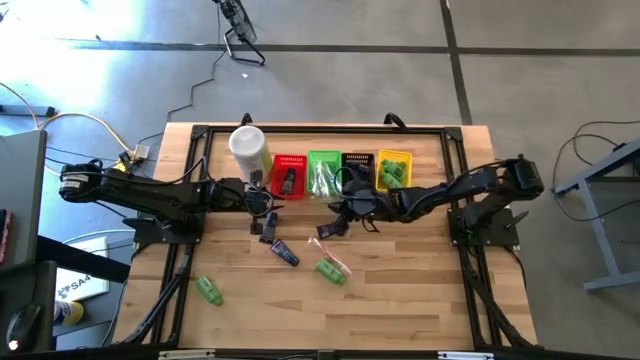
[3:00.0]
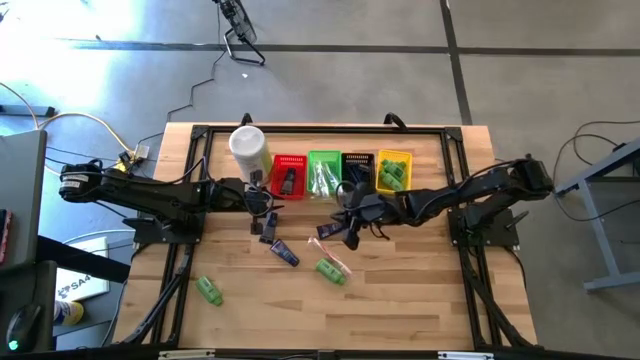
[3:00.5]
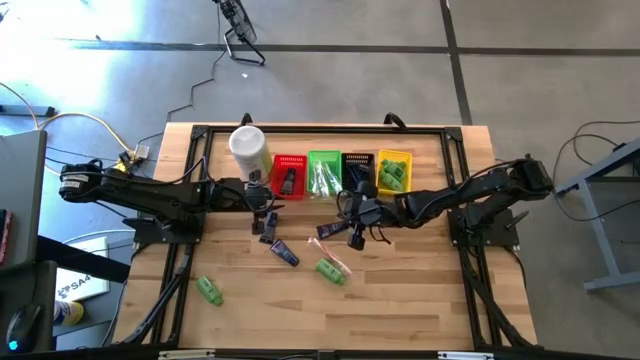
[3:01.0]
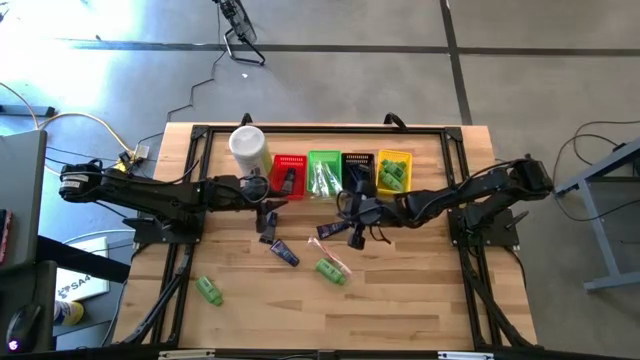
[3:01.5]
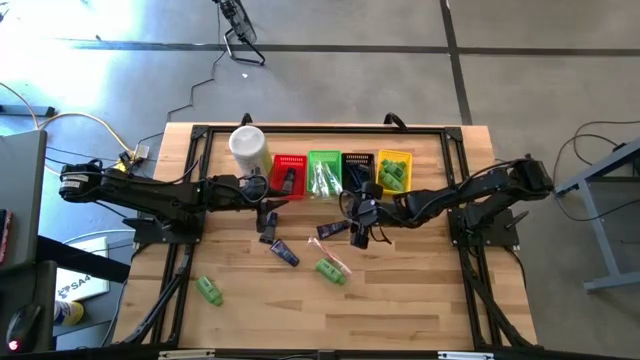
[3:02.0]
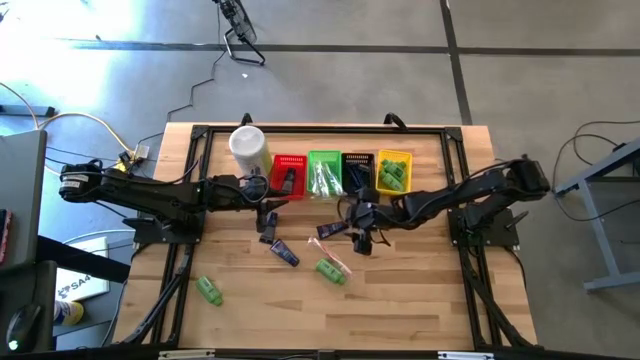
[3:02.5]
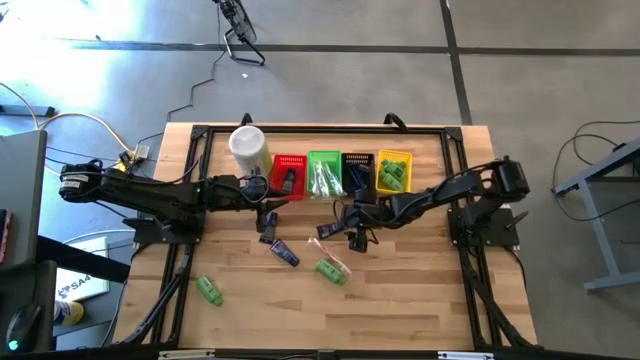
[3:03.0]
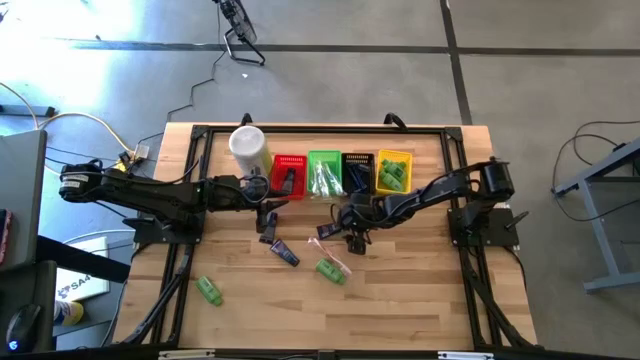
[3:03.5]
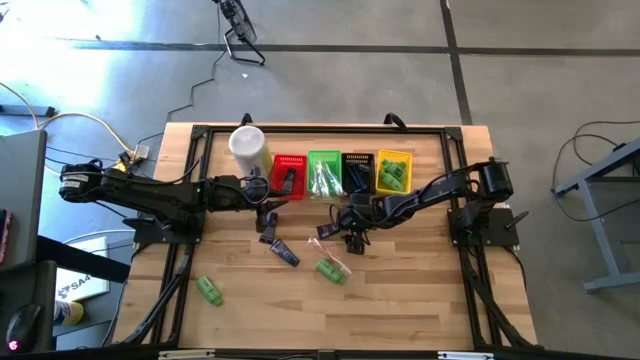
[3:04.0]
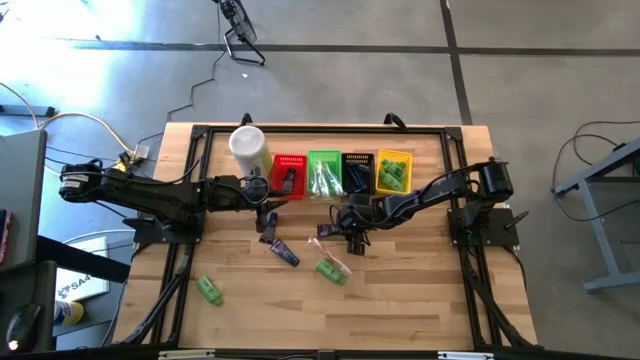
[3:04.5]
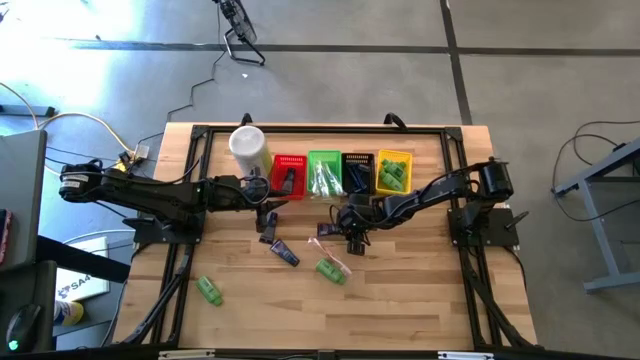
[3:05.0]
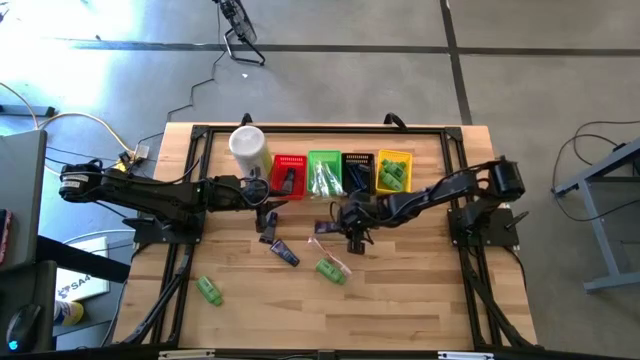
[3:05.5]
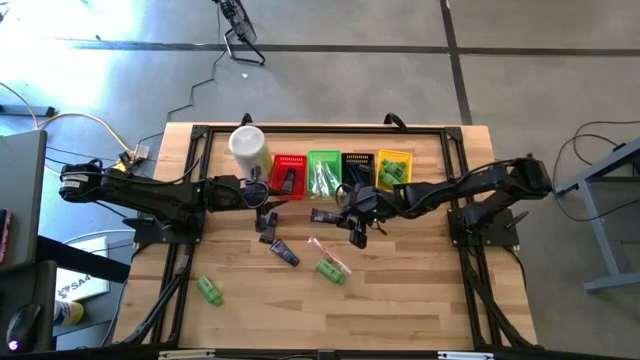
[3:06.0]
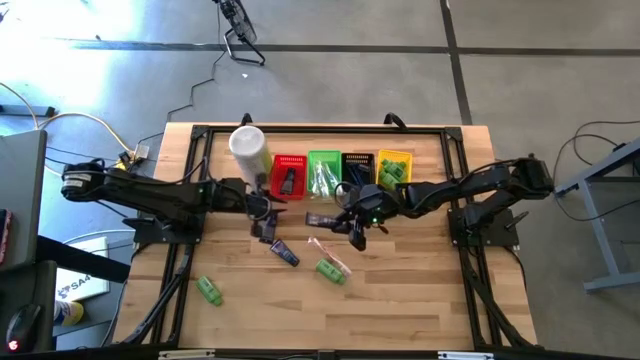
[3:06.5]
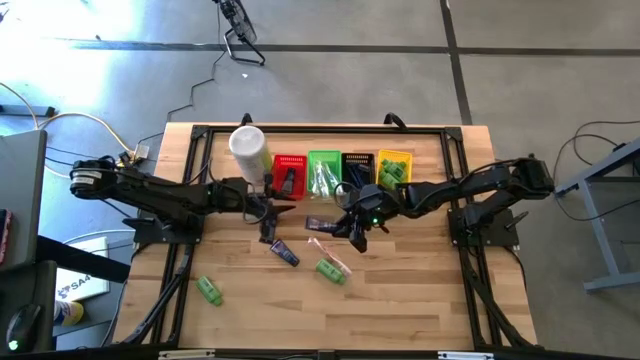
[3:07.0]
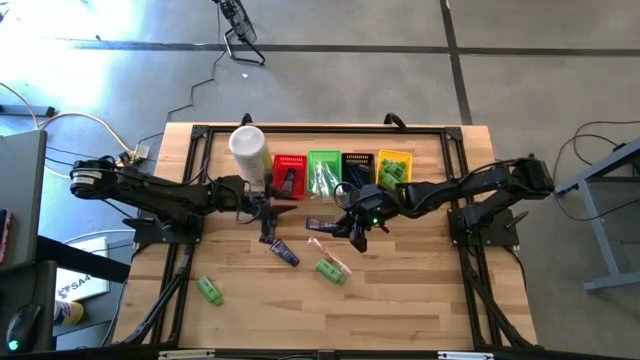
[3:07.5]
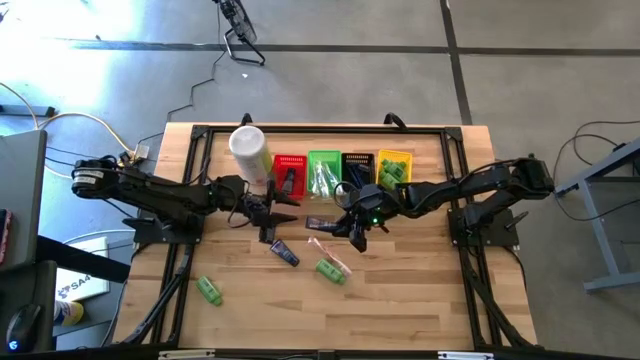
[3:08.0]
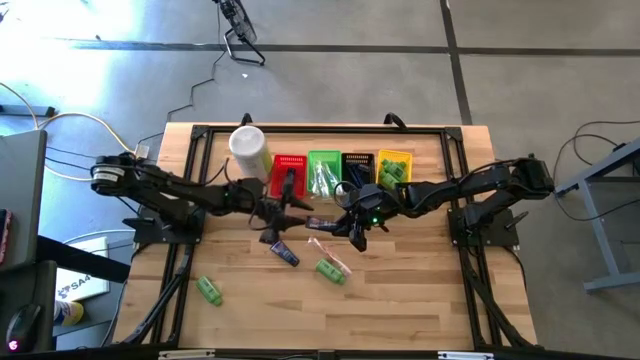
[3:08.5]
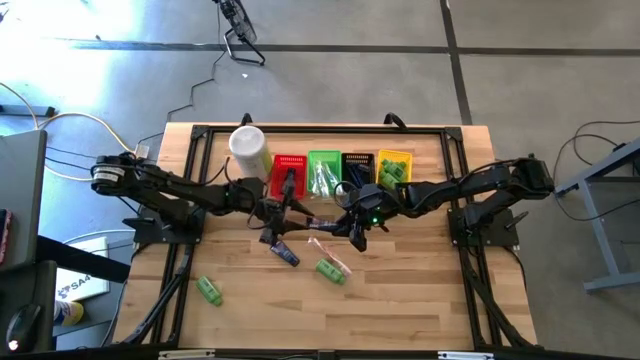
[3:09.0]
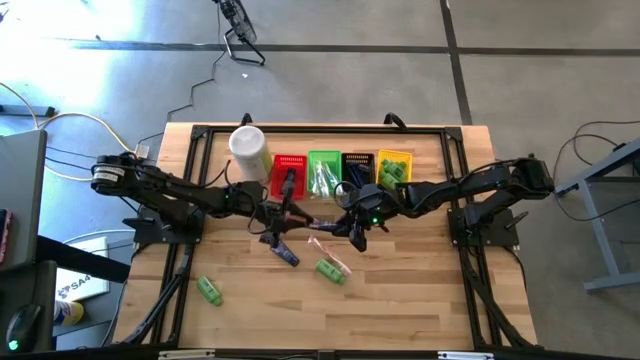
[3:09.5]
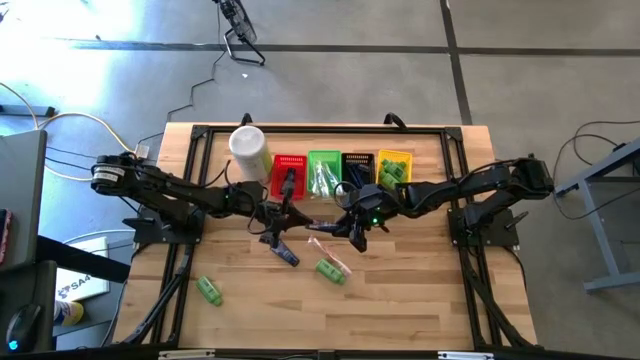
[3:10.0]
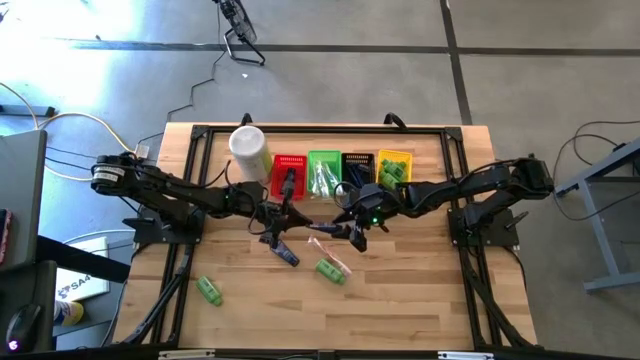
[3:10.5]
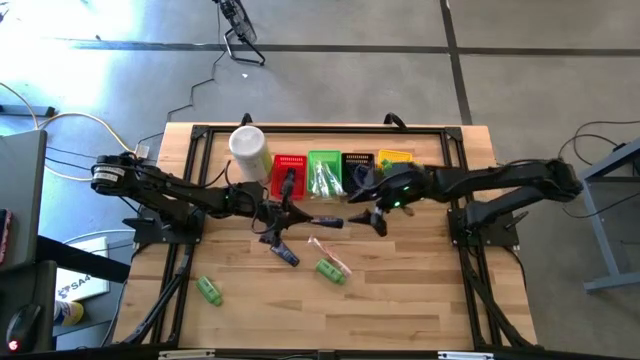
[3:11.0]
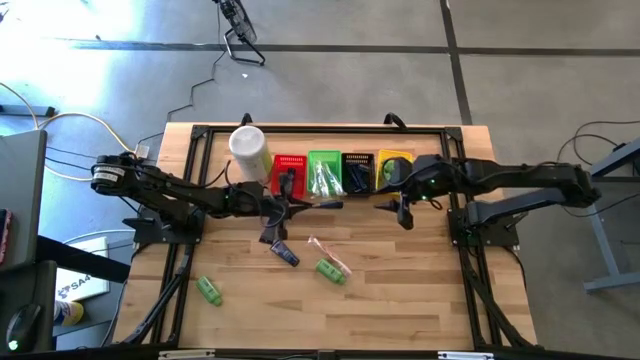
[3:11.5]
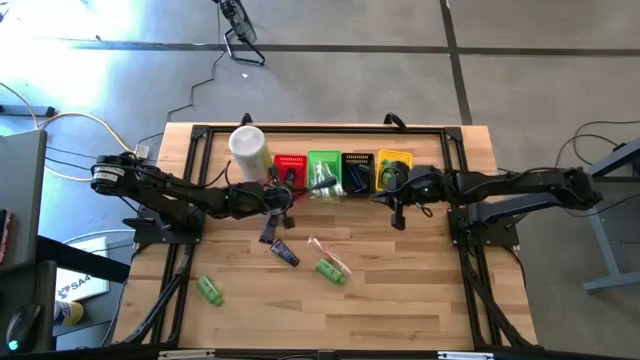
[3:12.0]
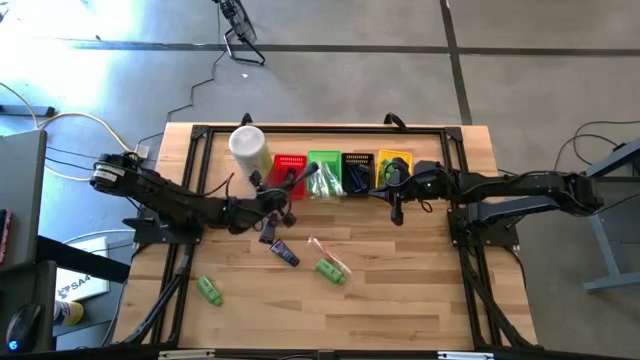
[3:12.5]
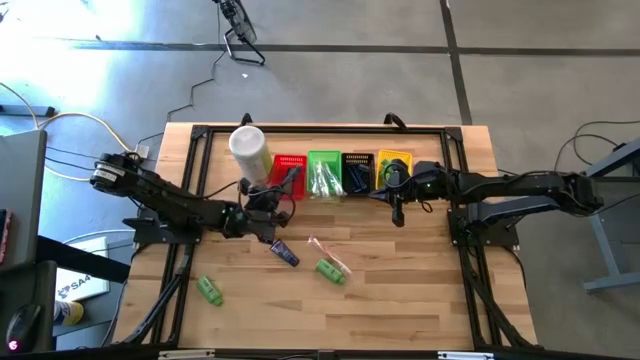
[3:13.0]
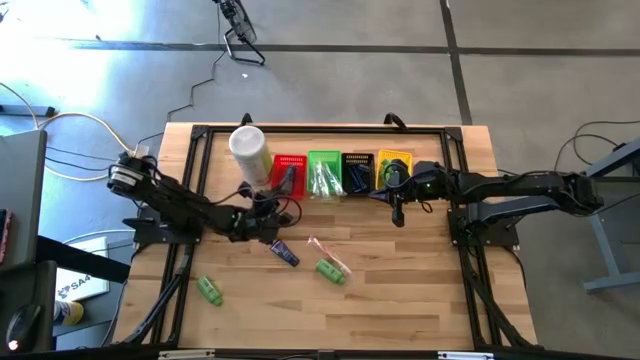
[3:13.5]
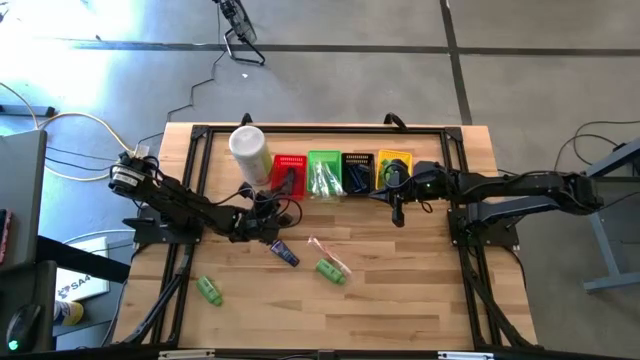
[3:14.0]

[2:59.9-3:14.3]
Task: Pick & Place Travel size toiletries
Put the blue shave cream into the red bin

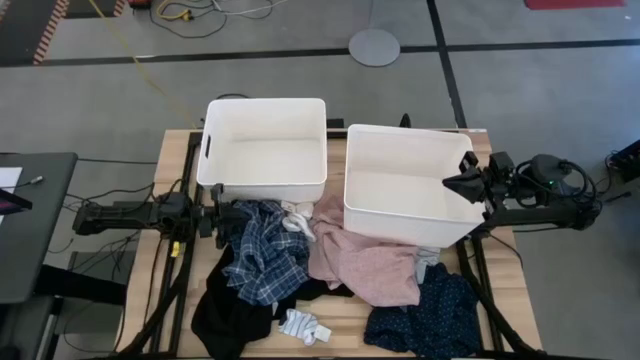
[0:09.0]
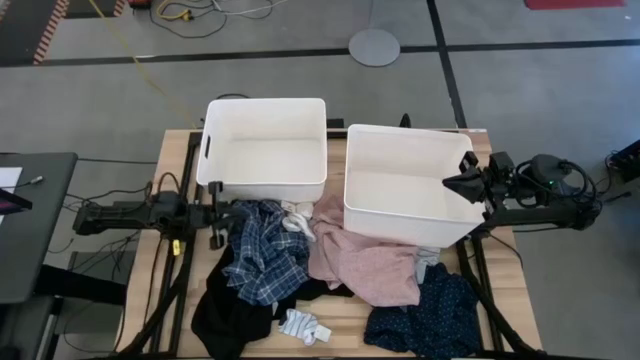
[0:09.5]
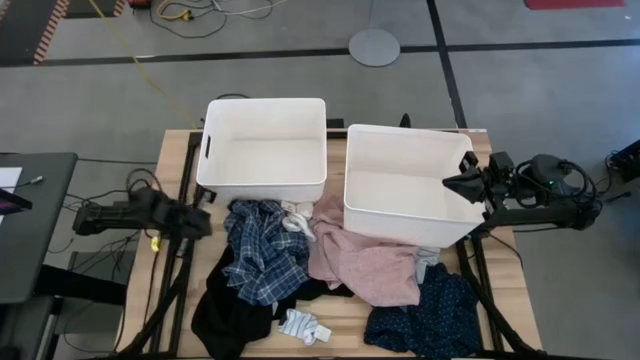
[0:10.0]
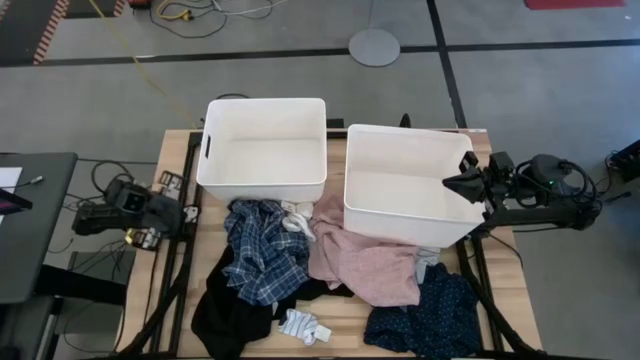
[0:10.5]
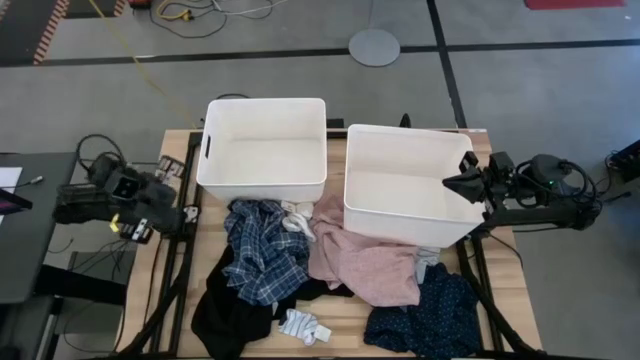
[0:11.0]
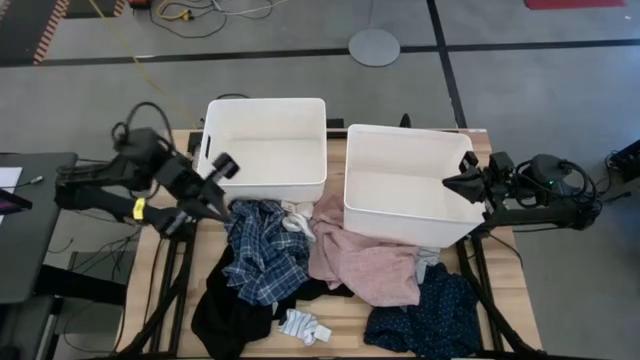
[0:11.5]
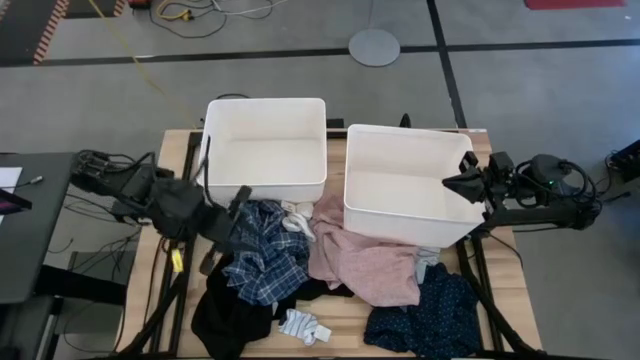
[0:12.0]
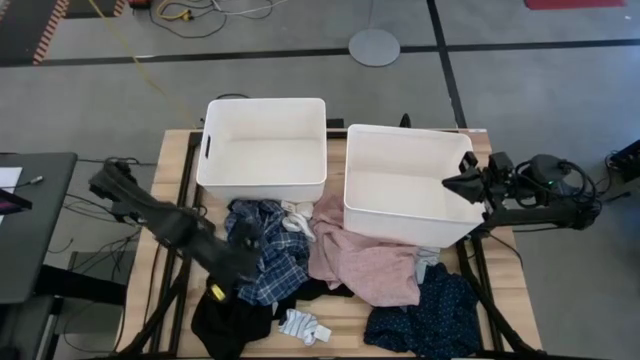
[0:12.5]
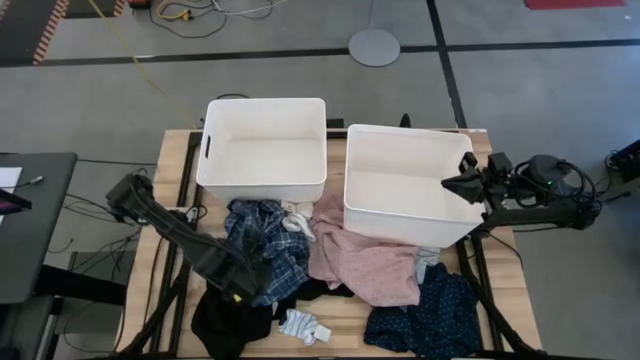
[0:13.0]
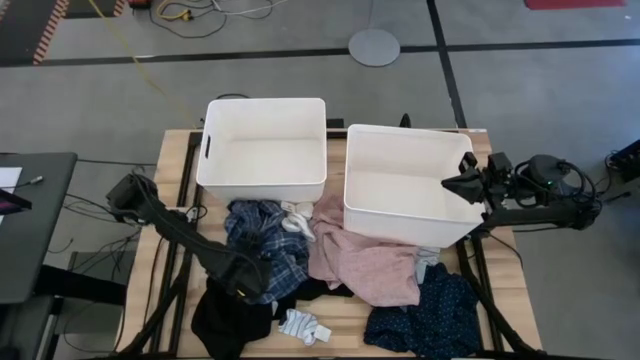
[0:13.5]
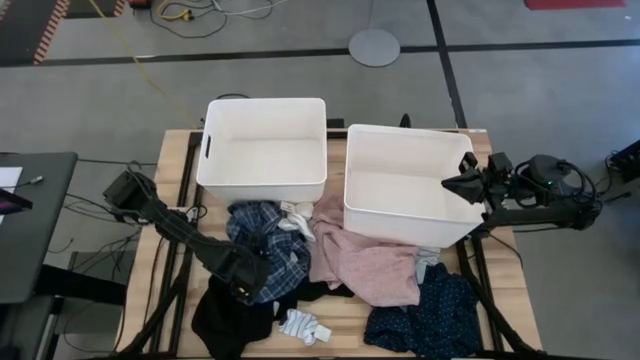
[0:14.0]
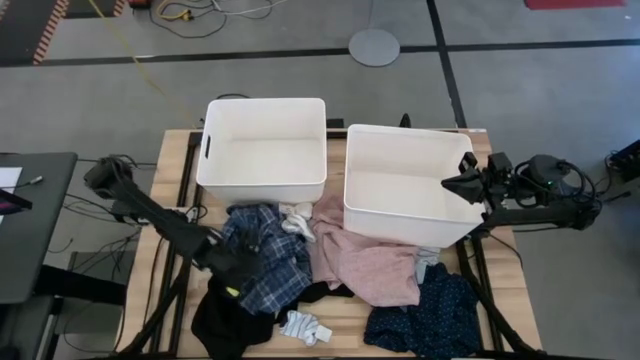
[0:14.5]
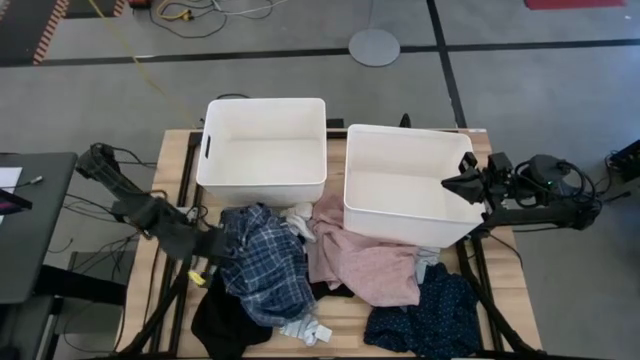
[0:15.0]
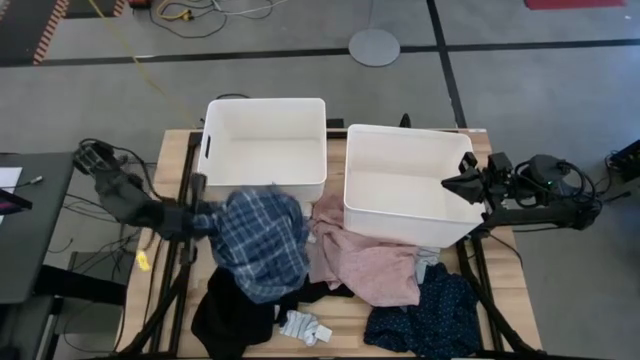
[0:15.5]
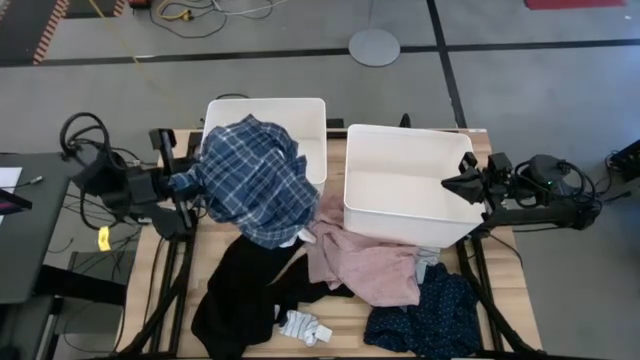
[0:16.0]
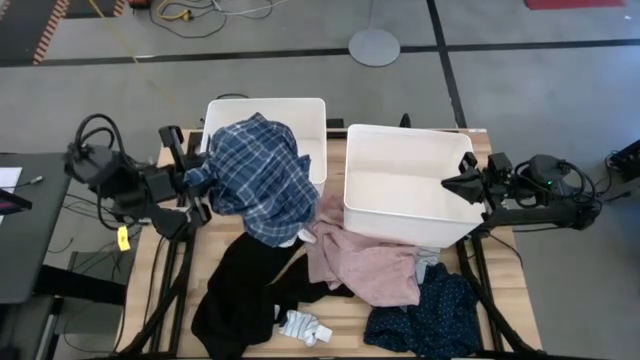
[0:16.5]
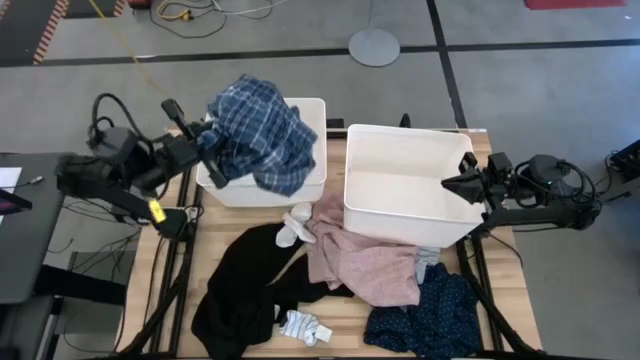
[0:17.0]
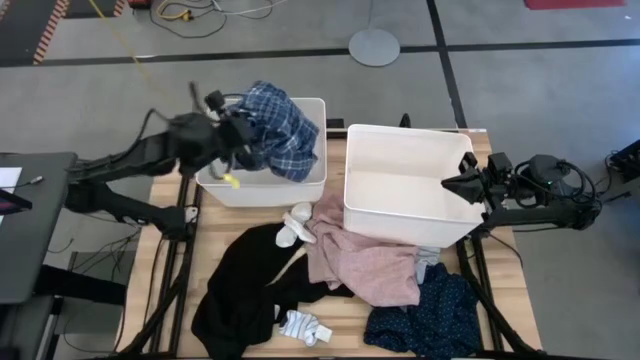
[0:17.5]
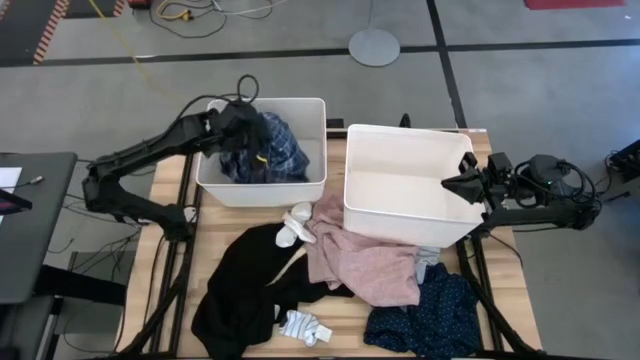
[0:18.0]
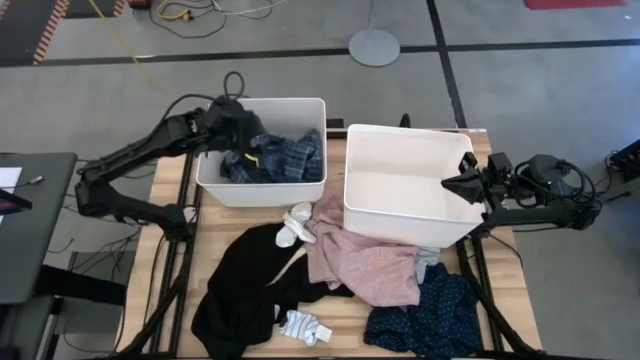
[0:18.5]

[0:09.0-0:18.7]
Task: Sort clothes
Put the blue pants into the left white laundry organizer
